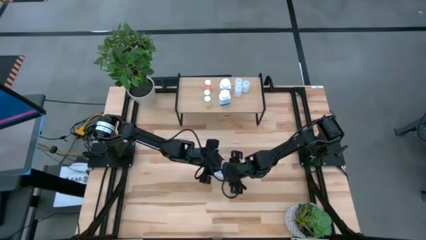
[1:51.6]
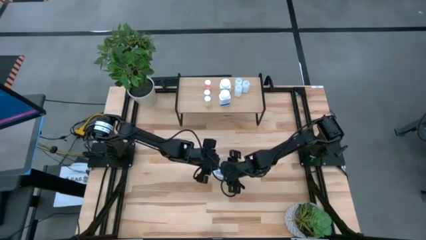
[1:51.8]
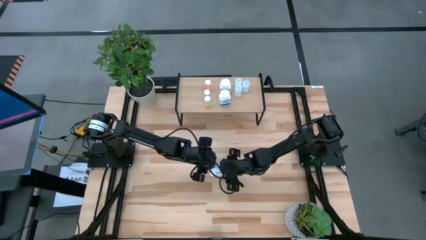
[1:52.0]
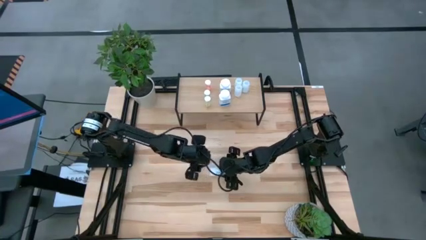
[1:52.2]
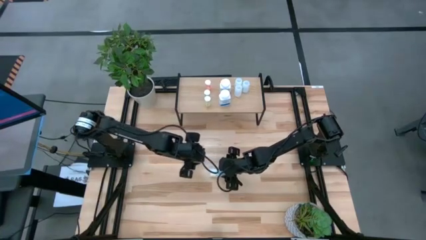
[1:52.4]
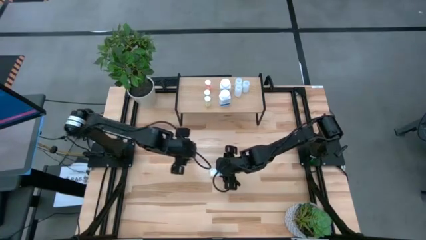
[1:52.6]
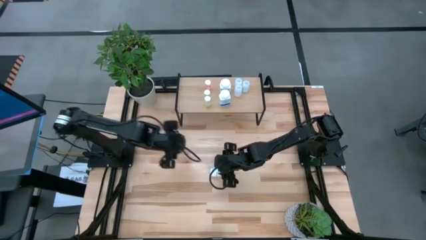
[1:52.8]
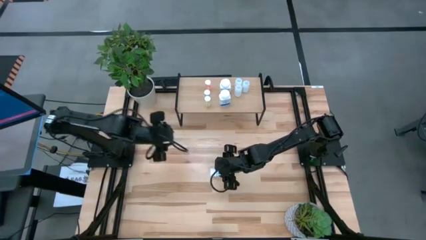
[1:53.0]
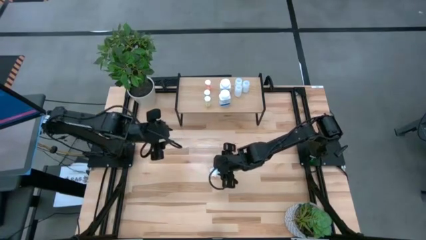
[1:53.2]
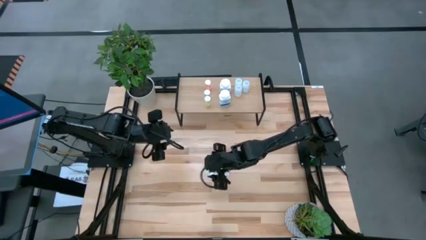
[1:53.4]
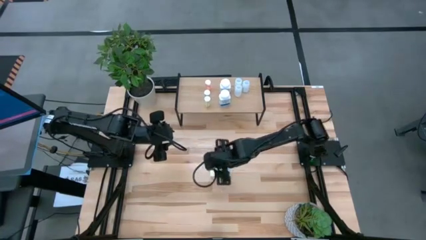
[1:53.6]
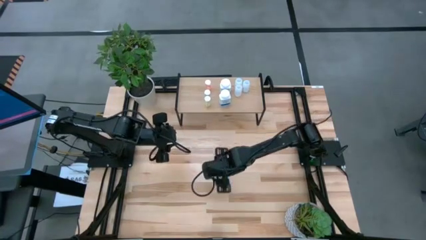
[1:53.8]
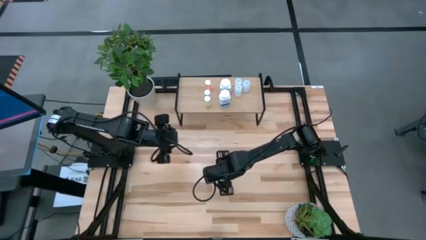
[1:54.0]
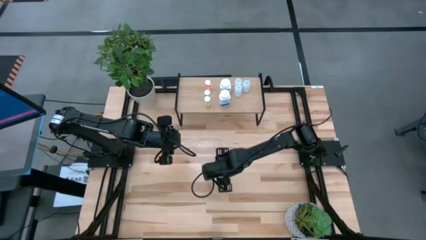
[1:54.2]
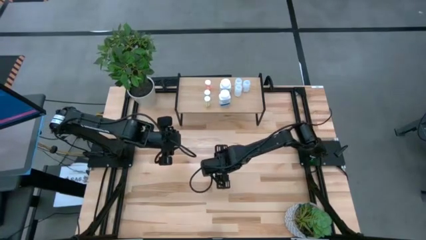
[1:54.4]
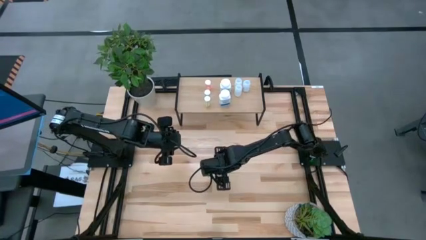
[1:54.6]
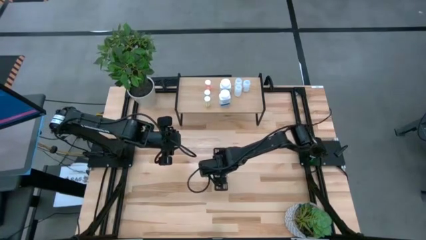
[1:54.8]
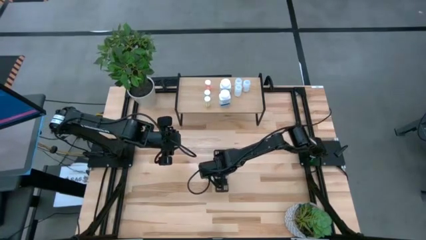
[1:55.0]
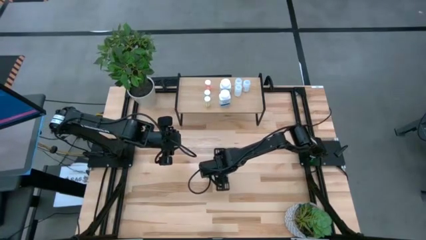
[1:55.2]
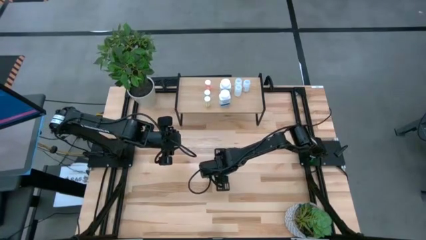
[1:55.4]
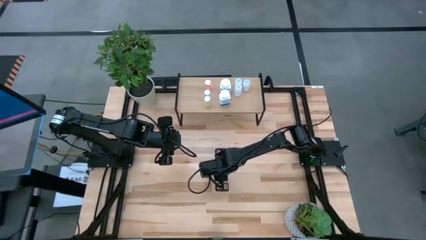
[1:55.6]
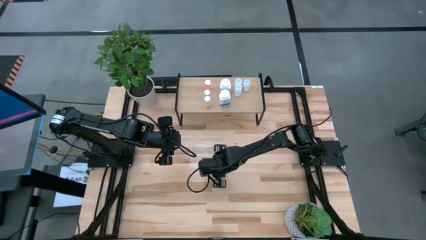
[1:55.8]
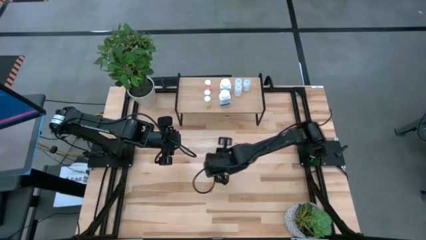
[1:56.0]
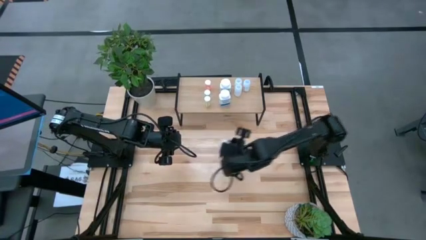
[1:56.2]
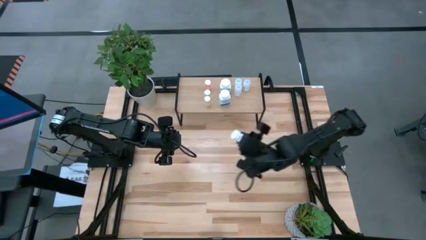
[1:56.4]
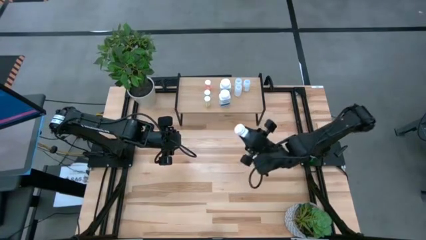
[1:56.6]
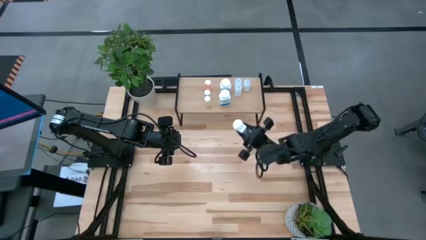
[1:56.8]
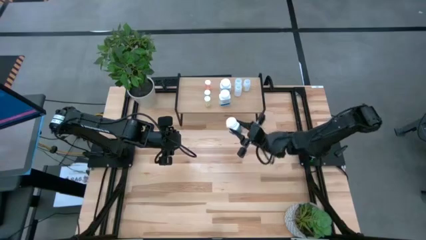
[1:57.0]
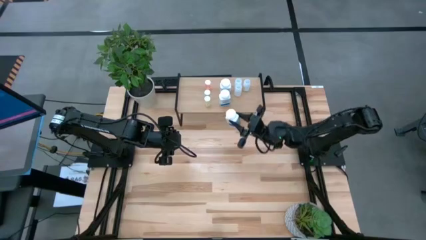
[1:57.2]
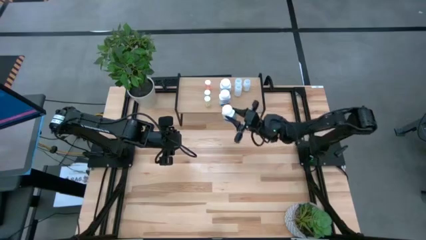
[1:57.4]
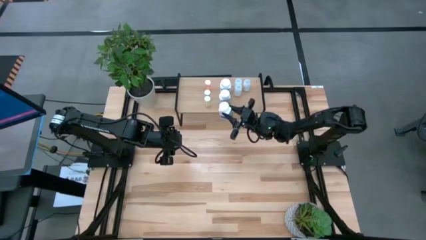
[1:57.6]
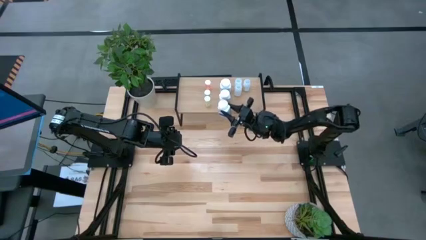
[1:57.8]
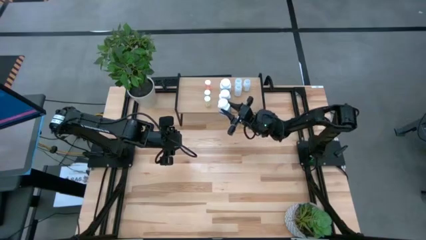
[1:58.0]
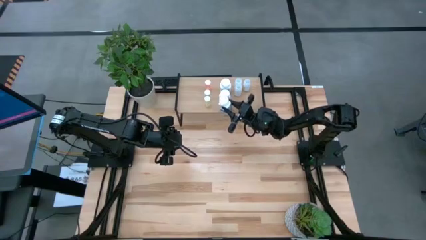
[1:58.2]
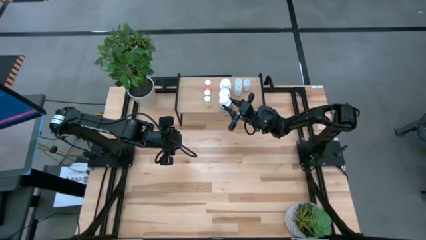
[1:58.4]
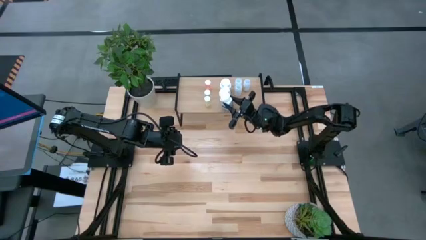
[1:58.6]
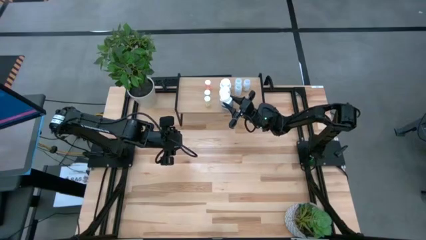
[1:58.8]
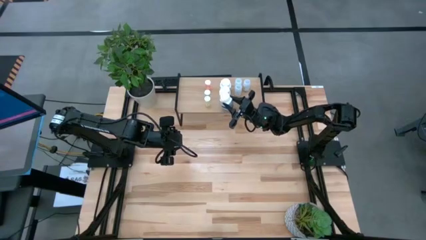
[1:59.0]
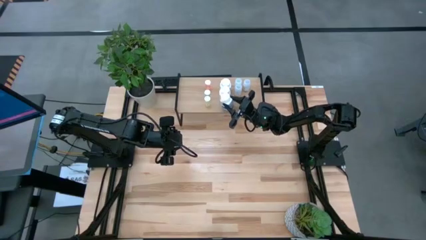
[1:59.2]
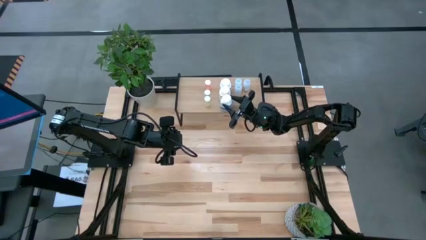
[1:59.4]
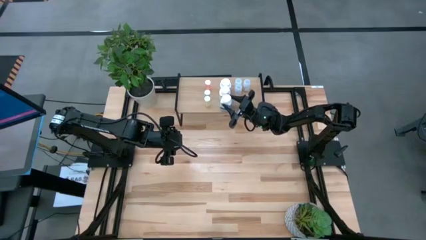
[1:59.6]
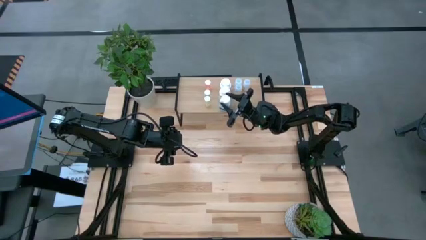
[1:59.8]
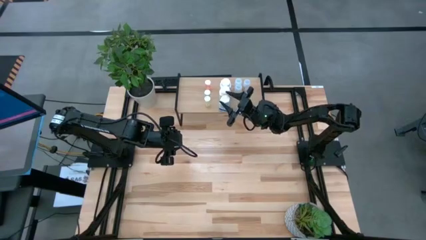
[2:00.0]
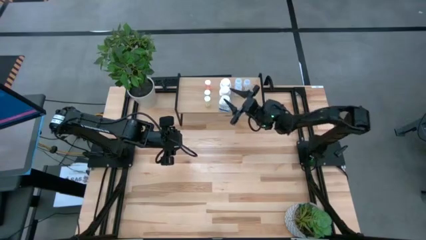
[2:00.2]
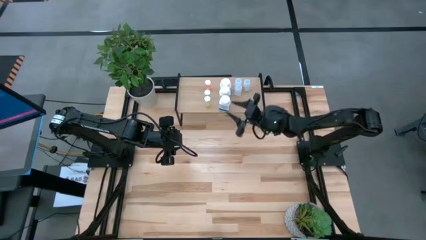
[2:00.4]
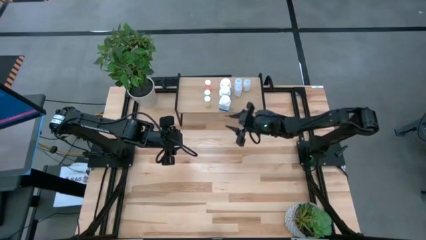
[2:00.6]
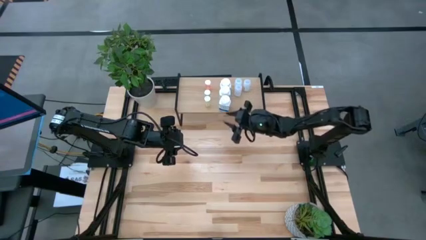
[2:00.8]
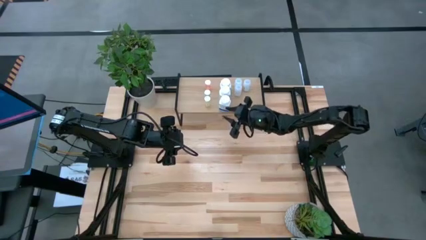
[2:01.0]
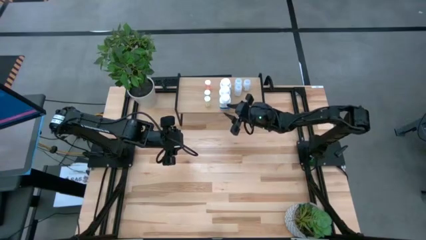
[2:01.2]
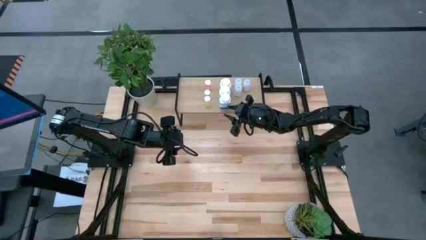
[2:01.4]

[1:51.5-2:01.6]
Task: Pick and place medicine bottles onto shelf by color
Put the white and blue pill bottle on the shelf aligned with white and blue pill bottles

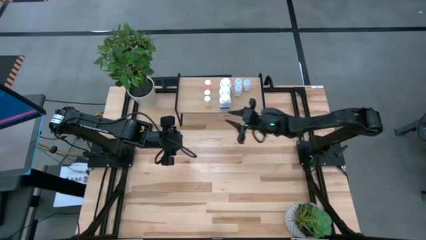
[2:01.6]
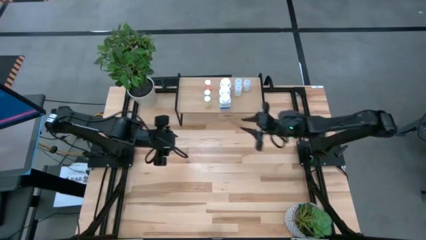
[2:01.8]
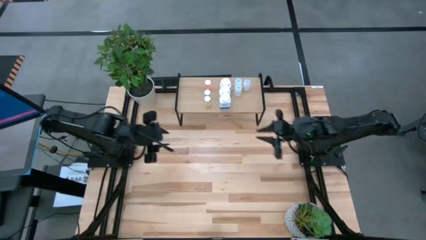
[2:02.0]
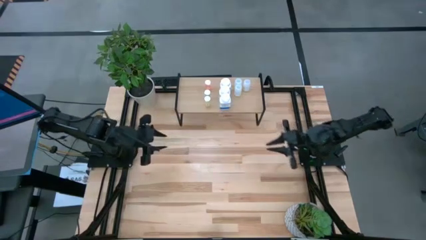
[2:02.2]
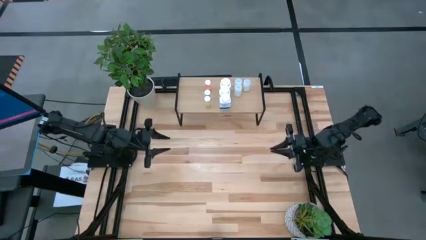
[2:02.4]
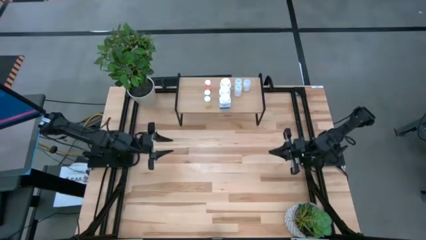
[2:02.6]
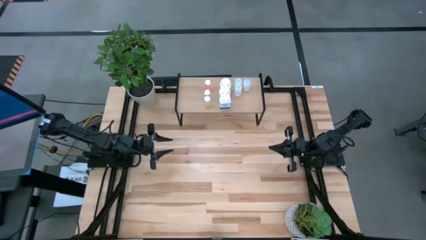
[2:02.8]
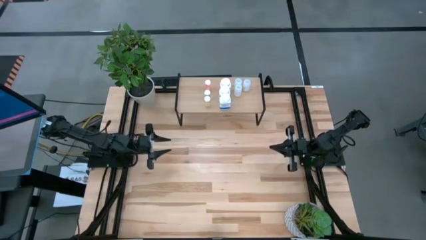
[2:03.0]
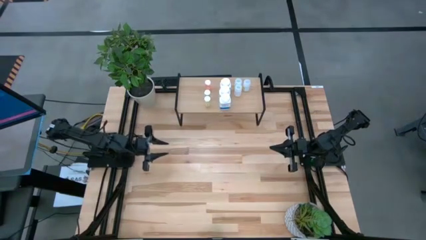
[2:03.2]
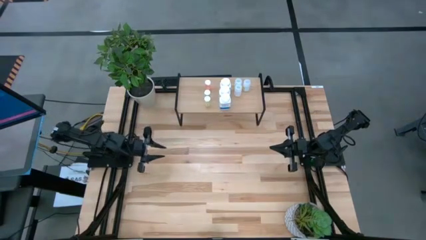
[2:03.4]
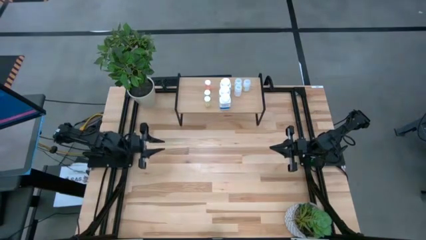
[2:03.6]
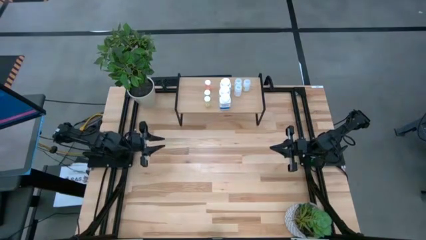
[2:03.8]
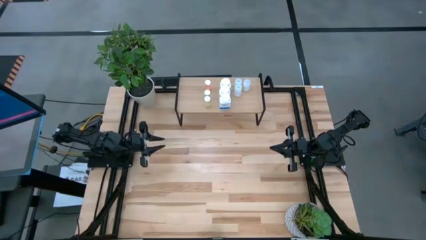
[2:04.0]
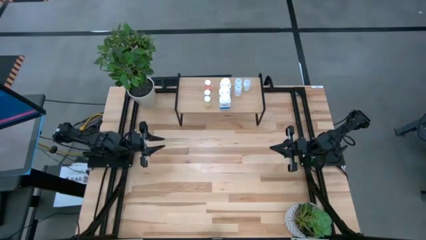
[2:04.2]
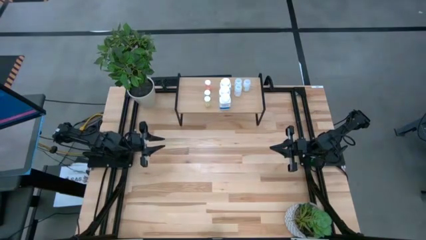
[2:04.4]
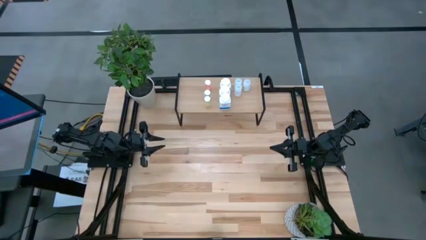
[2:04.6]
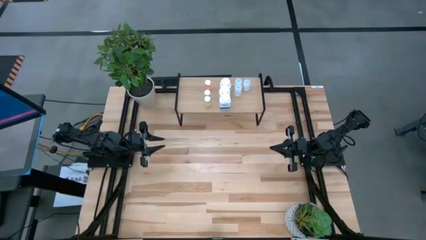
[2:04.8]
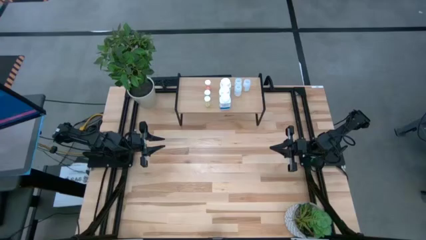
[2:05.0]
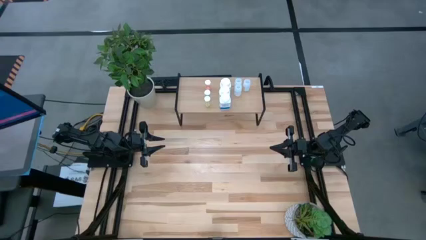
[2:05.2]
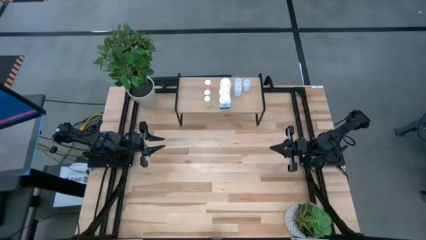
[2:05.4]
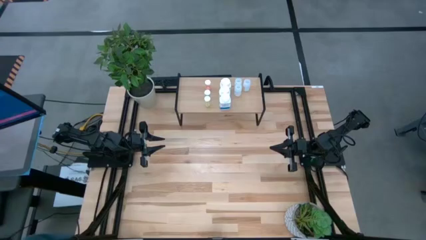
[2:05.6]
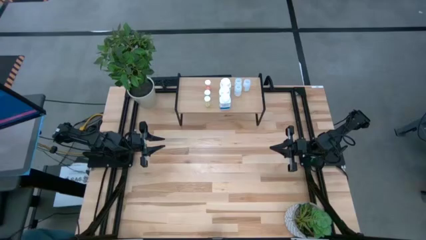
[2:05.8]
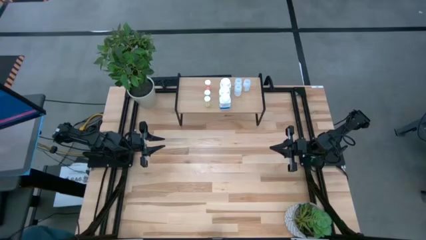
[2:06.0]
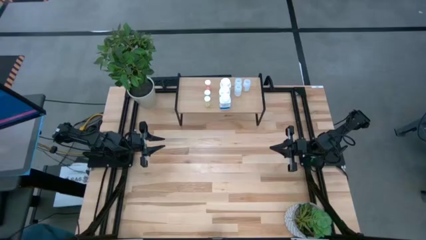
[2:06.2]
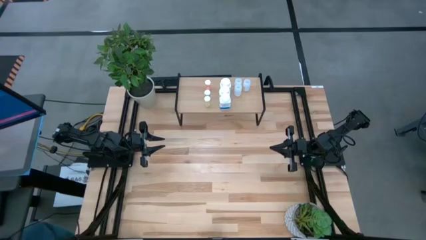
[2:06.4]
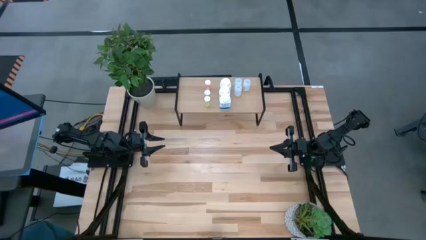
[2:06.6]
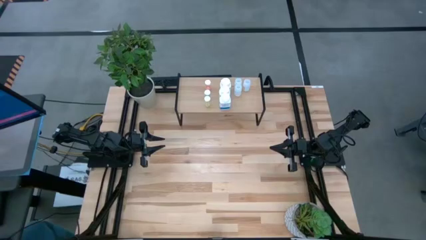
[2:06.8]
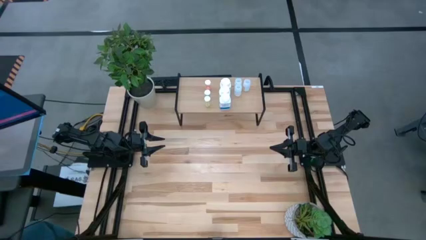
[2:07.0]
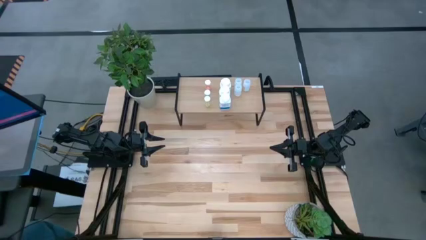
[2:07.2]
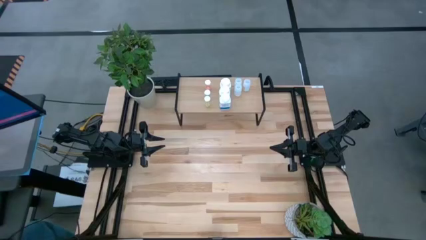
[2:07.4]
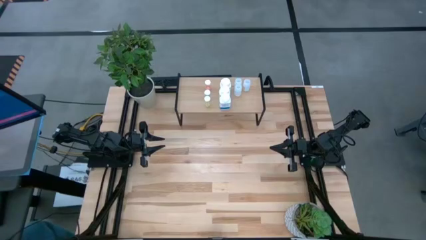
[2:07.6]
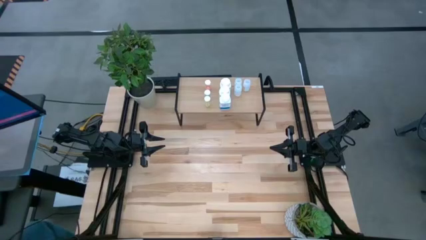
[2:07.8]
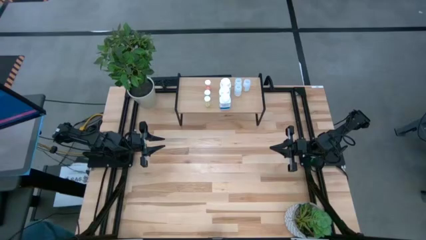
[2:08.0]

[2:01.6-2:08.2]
Return to Home Position
